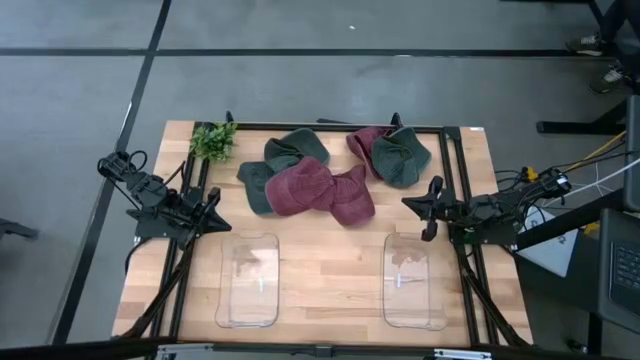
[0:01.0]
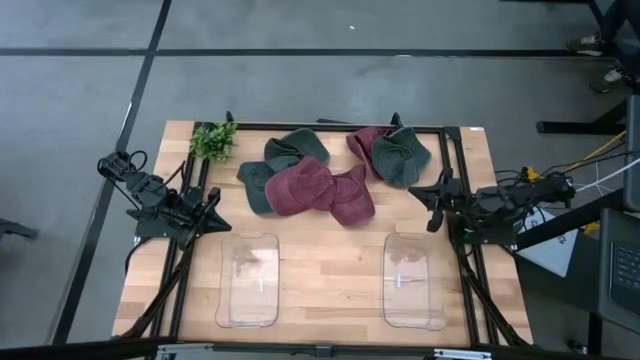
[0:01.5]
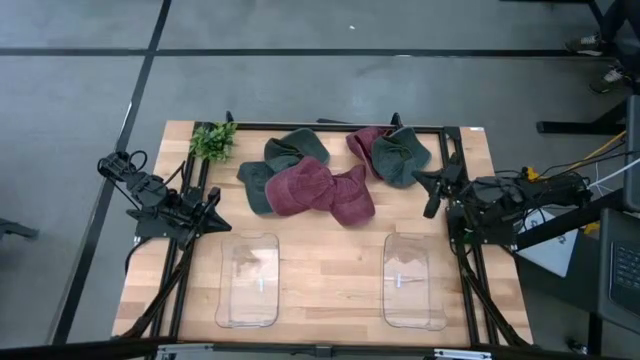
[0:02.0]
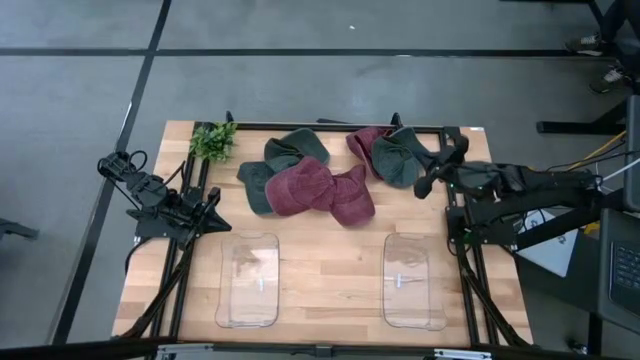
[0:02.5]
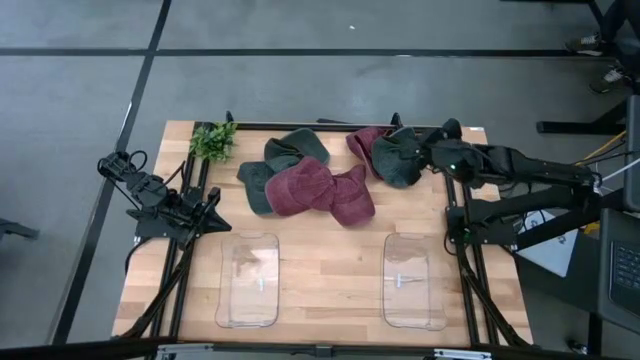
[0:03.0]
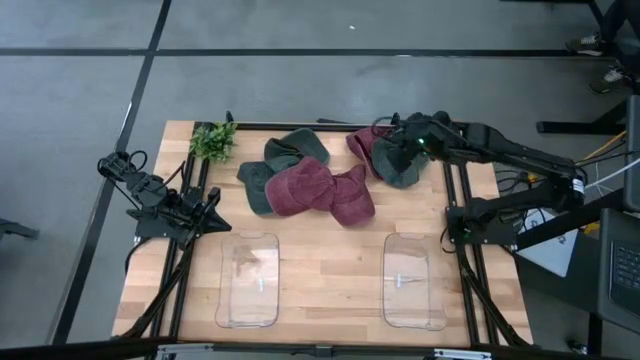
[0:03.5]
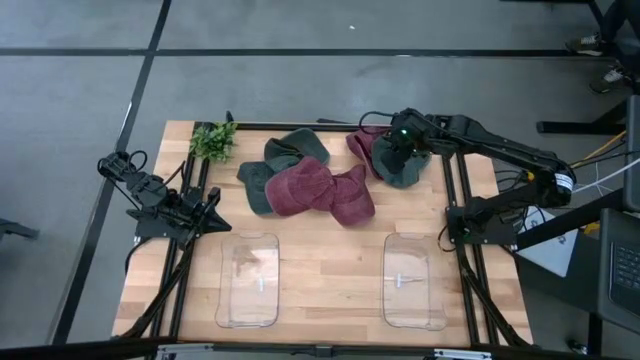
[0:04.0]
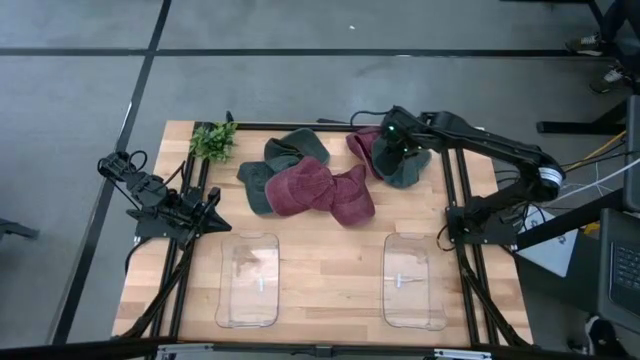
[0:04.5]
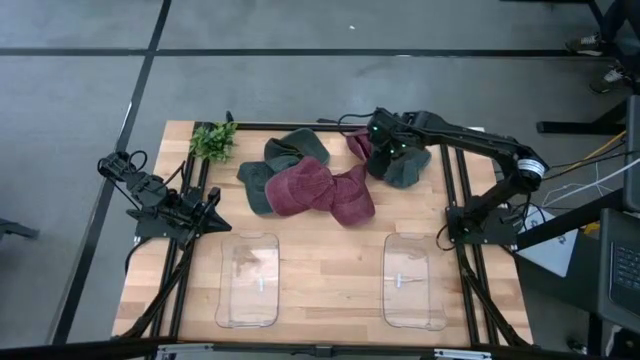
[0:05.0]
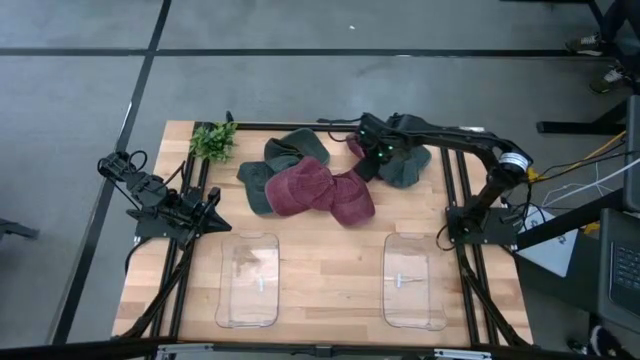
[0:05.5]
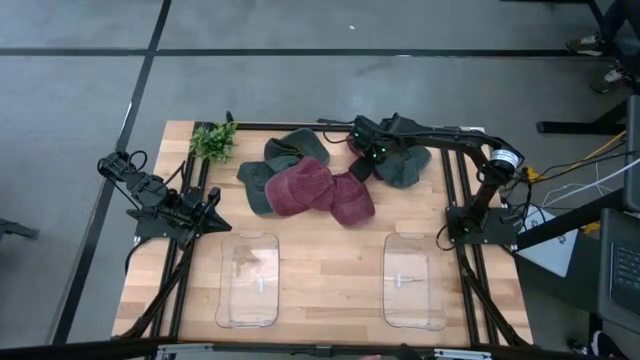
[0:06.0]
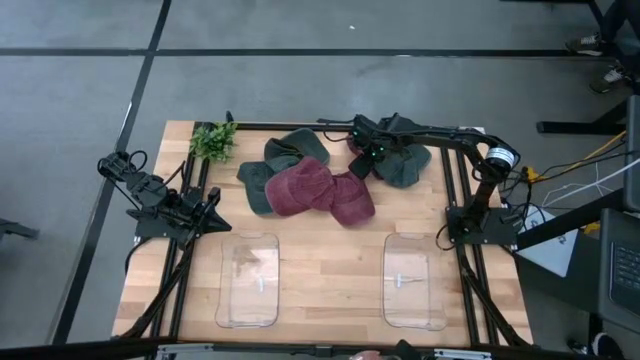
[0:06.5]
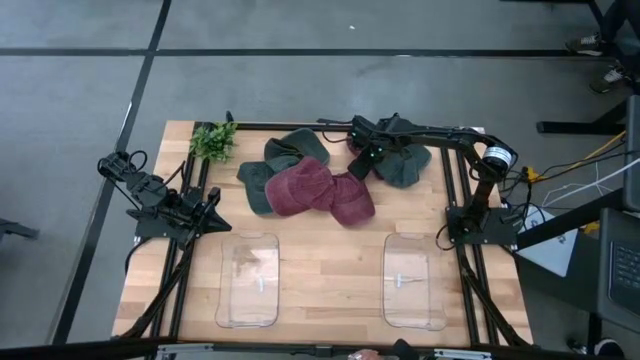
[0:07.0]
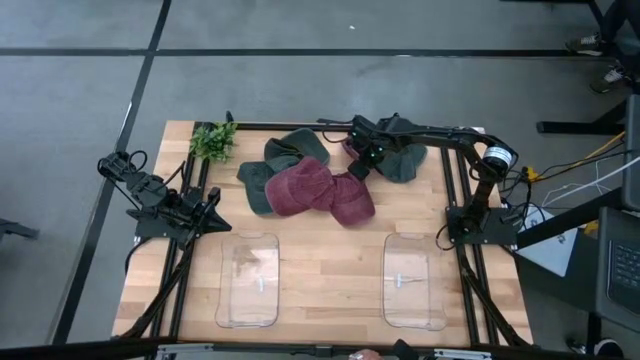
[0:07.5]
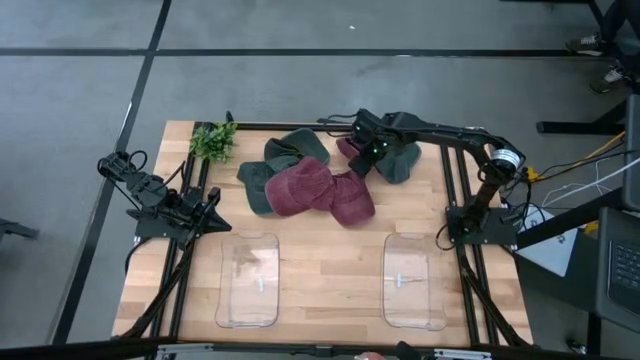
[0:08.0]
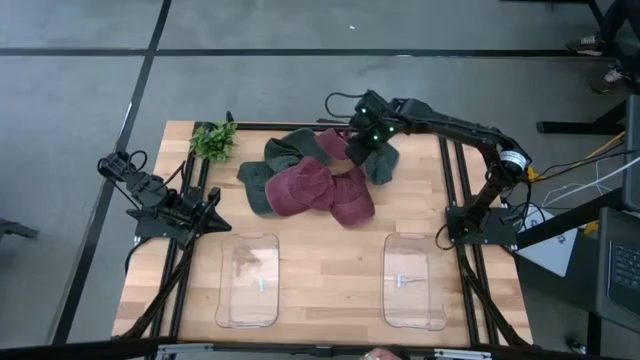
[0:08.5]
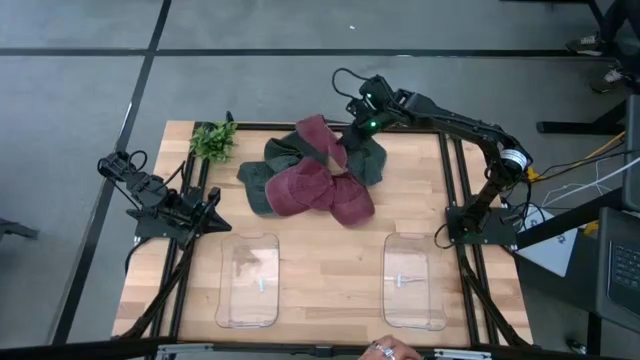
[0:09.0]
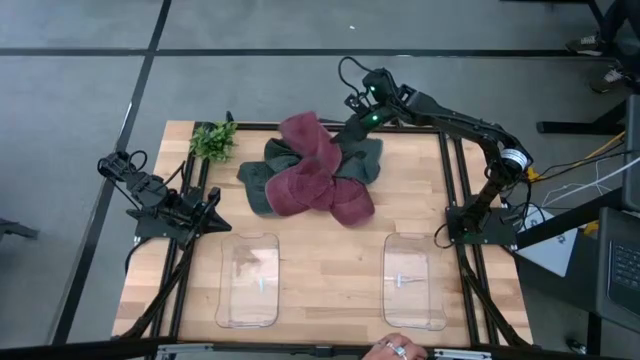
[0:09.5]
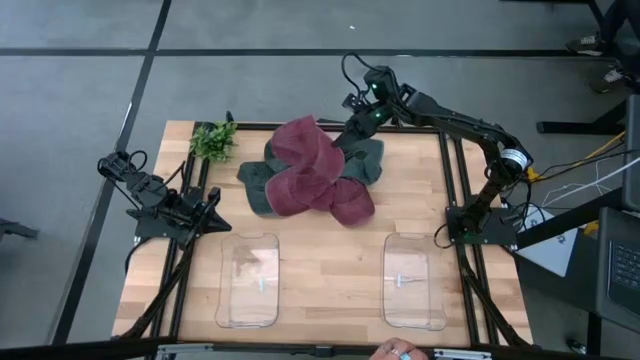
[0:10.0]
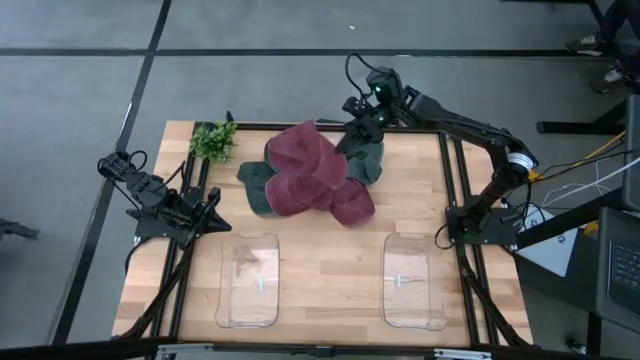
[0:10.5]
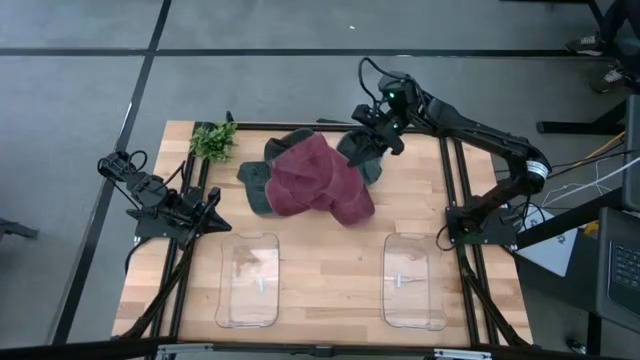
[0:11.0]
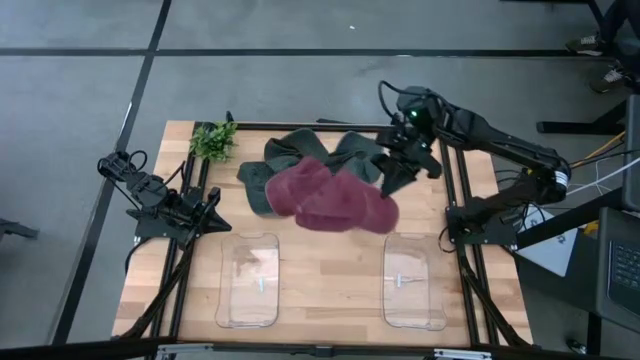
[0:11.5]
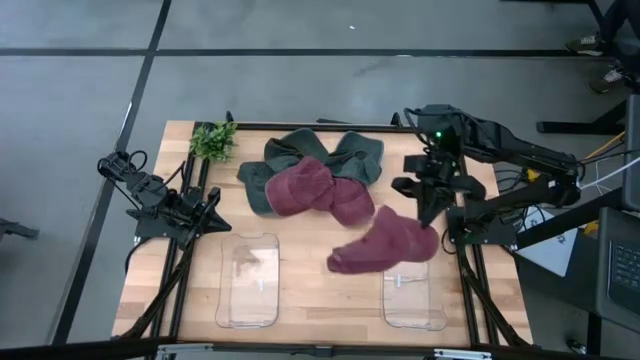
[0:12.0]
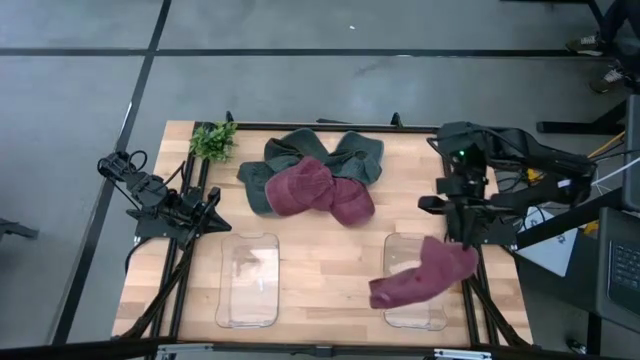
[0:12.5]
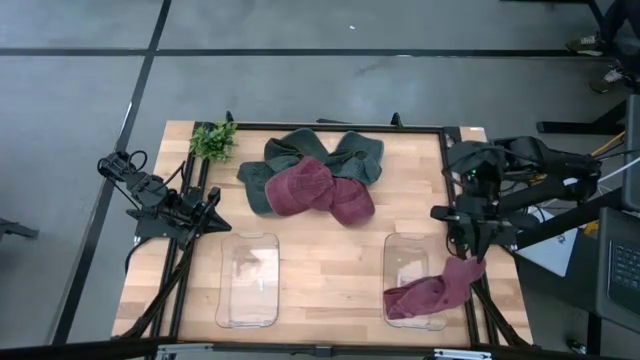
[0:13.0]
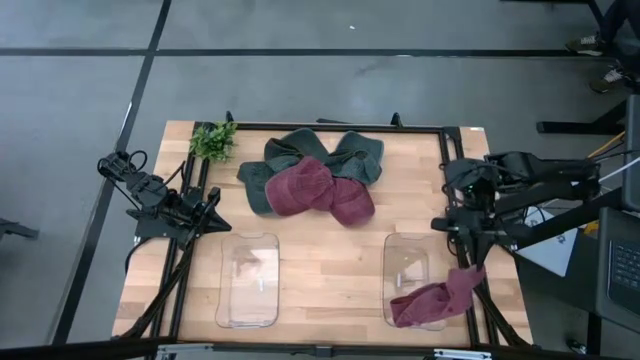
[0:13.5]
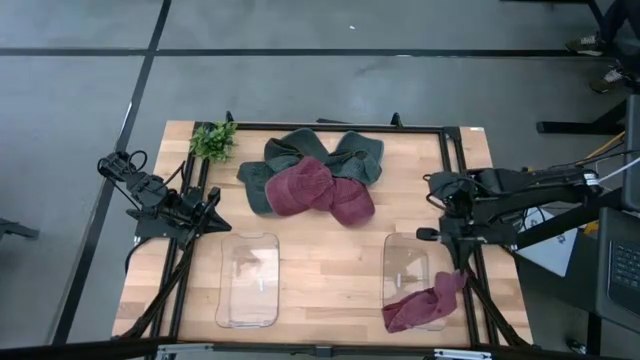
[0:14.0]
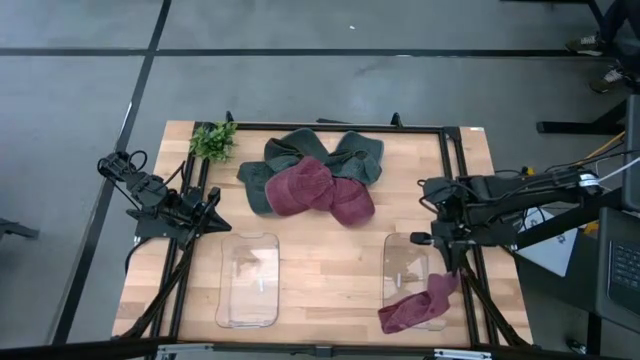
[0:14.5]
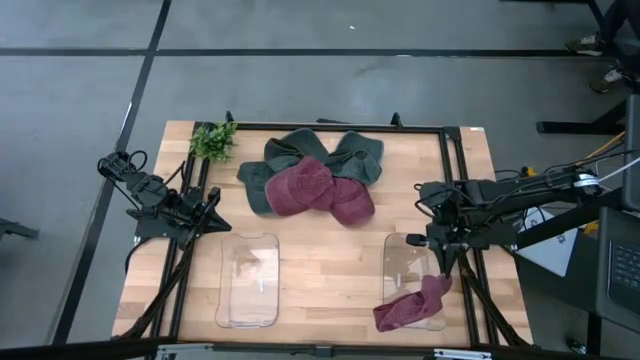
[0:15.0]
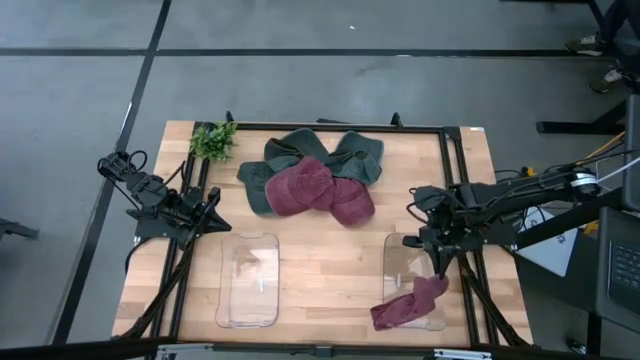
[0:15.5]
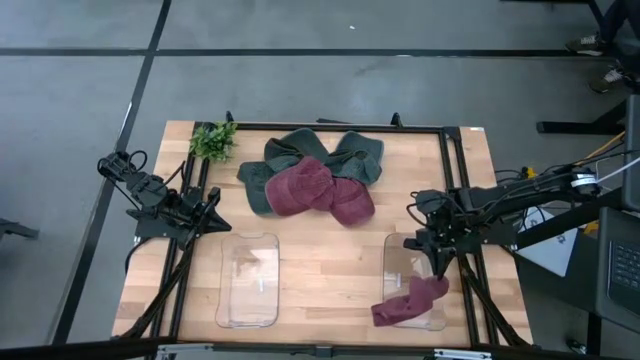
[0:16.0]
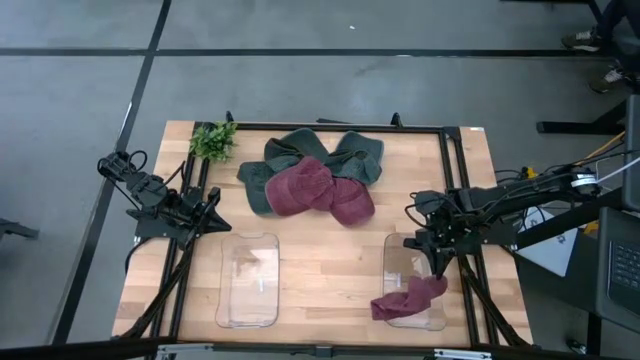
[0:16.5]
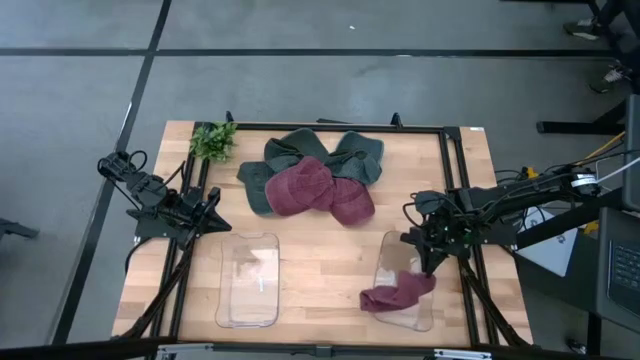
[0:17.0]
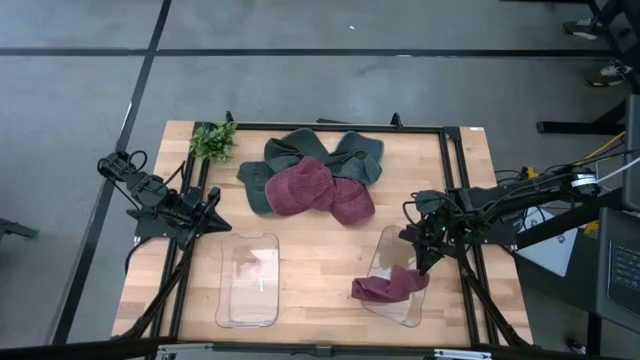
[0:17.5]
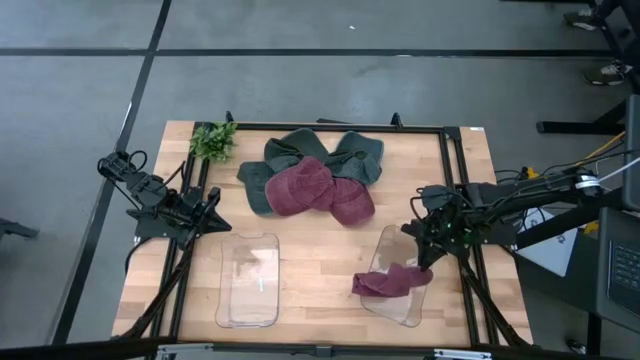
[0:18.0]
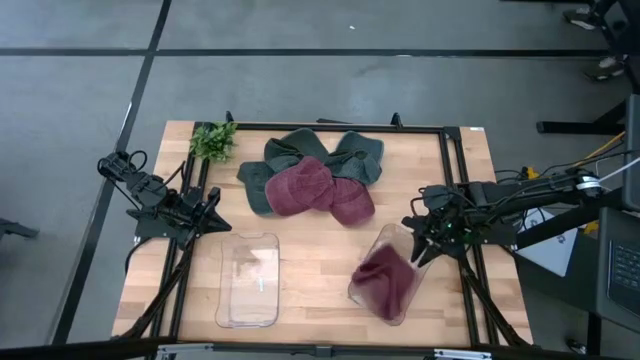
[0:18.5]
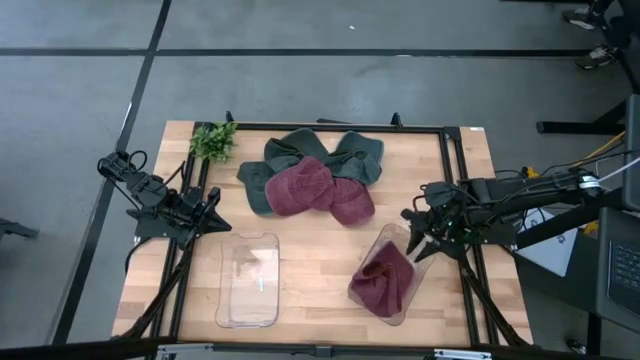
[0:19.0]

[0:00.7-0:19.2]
Task: Pick & Place hat
Put the right red cap into the right transparent bin
